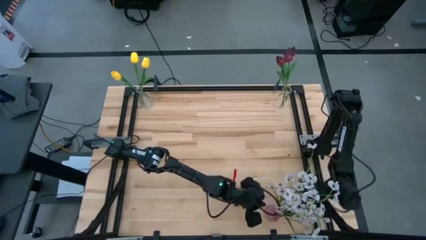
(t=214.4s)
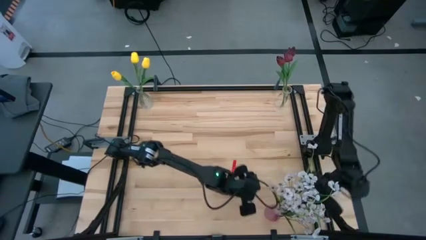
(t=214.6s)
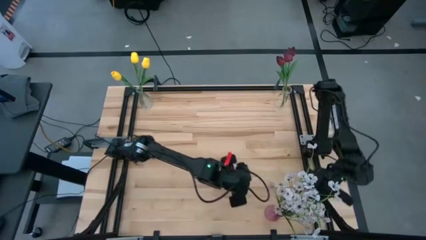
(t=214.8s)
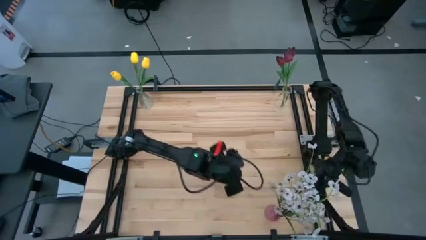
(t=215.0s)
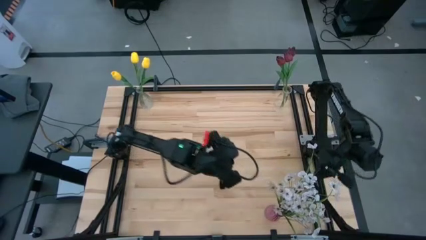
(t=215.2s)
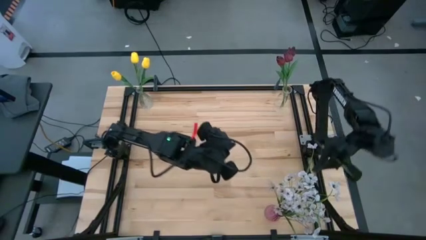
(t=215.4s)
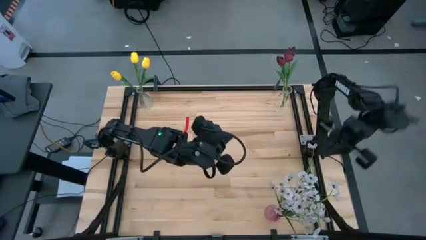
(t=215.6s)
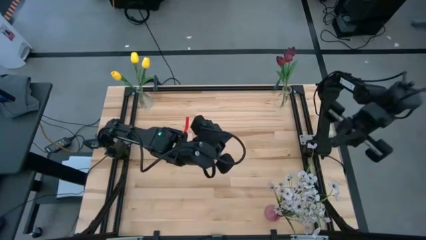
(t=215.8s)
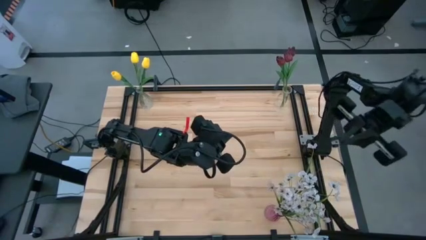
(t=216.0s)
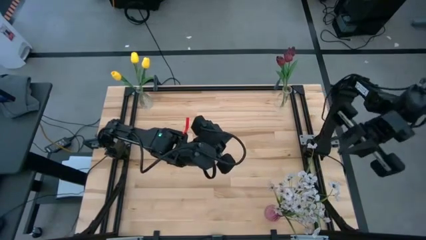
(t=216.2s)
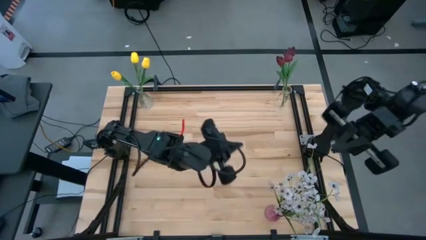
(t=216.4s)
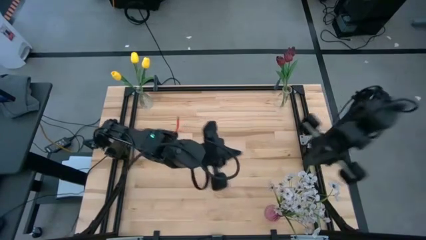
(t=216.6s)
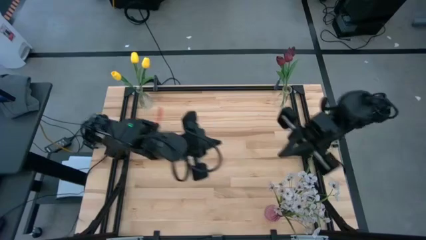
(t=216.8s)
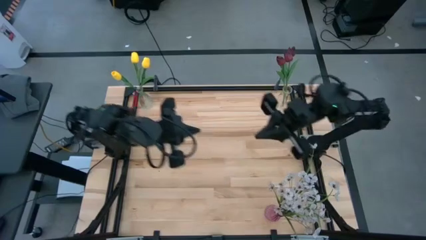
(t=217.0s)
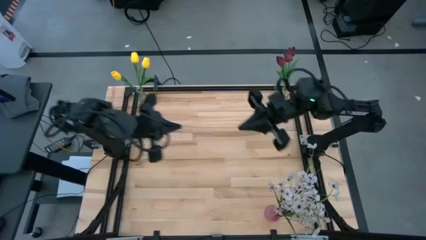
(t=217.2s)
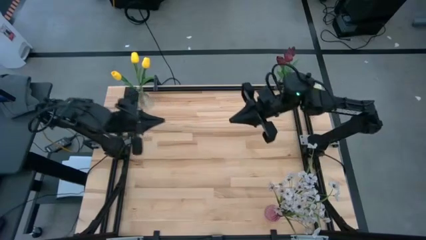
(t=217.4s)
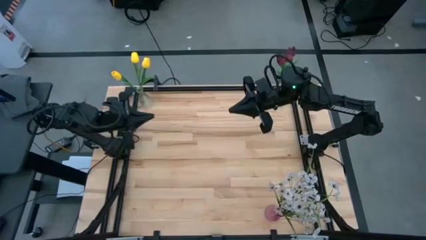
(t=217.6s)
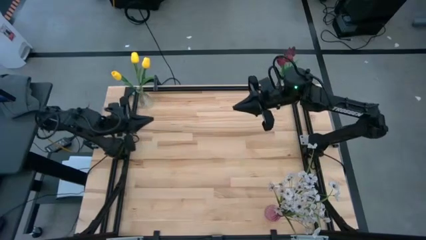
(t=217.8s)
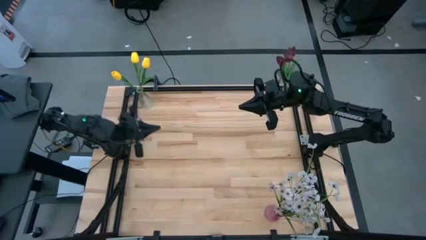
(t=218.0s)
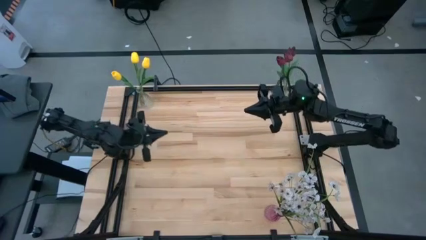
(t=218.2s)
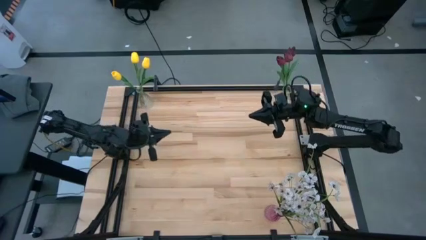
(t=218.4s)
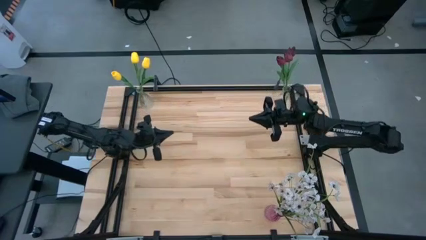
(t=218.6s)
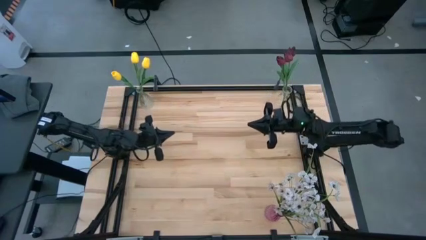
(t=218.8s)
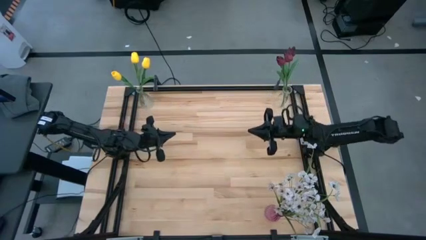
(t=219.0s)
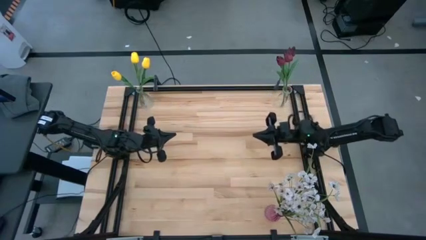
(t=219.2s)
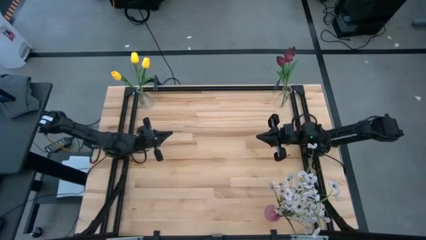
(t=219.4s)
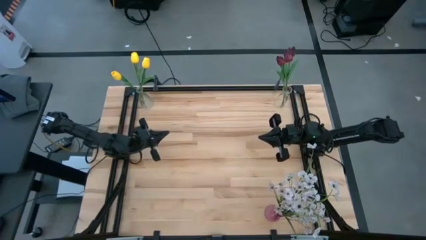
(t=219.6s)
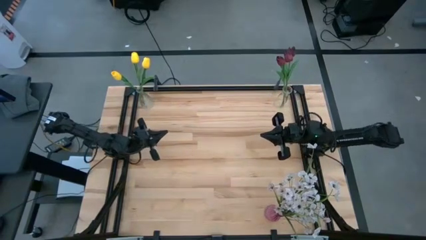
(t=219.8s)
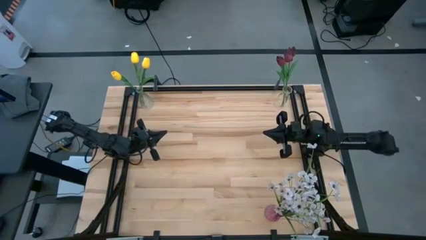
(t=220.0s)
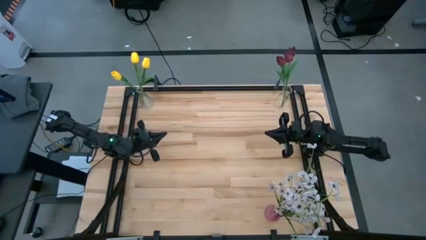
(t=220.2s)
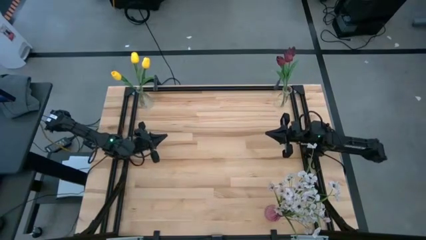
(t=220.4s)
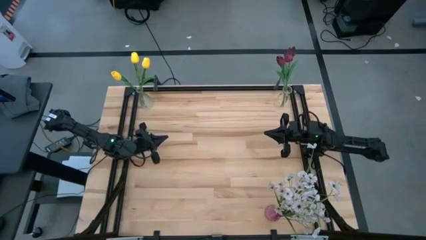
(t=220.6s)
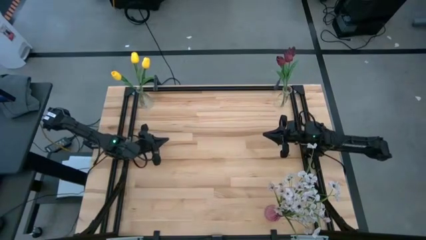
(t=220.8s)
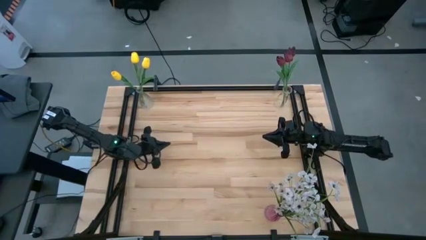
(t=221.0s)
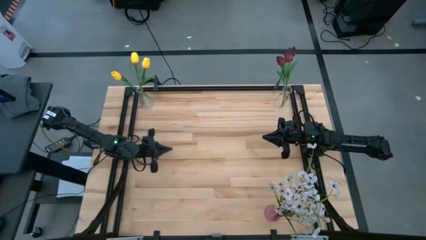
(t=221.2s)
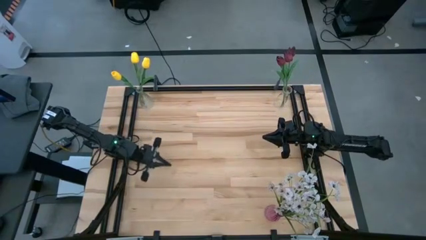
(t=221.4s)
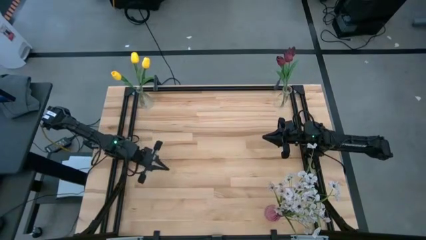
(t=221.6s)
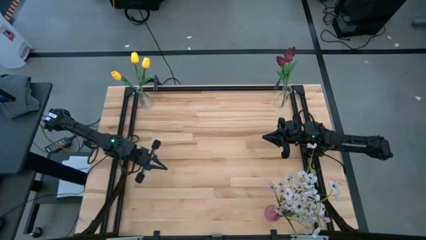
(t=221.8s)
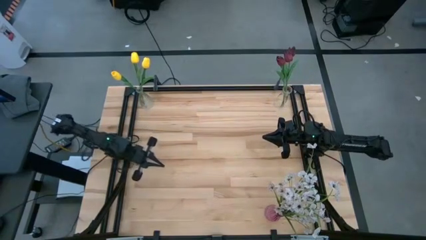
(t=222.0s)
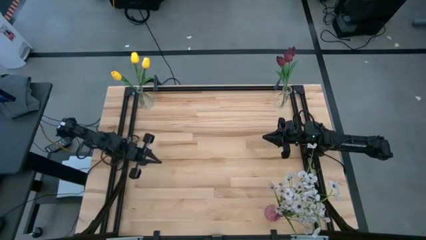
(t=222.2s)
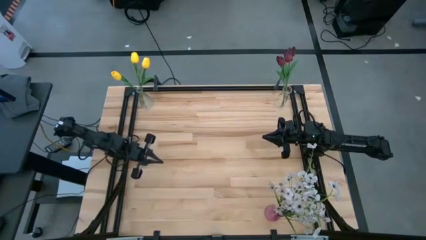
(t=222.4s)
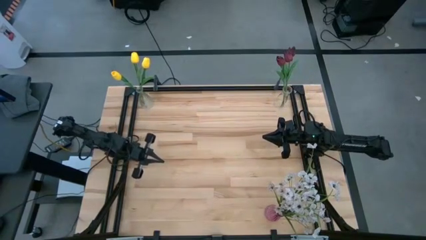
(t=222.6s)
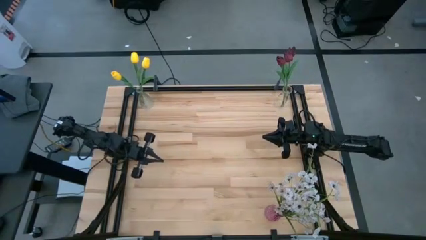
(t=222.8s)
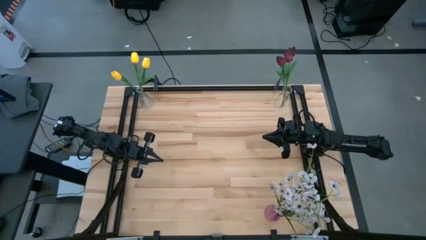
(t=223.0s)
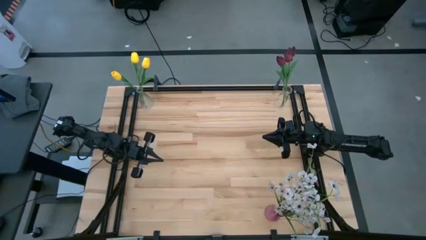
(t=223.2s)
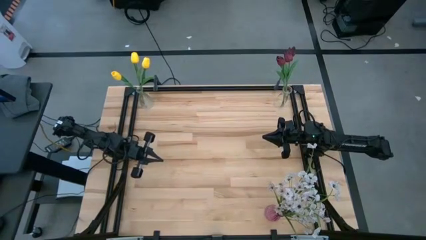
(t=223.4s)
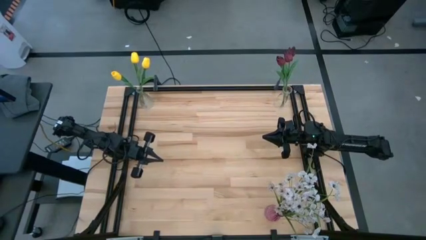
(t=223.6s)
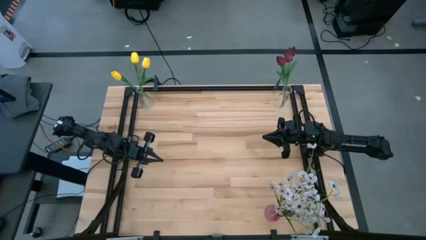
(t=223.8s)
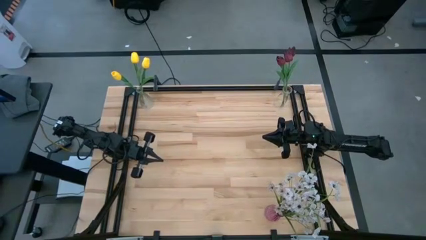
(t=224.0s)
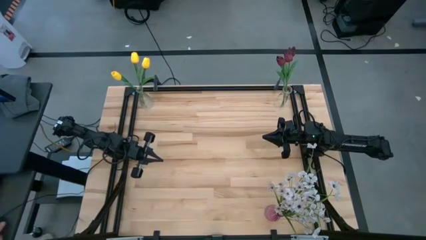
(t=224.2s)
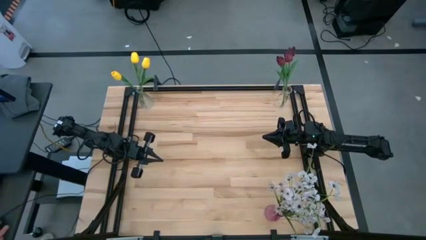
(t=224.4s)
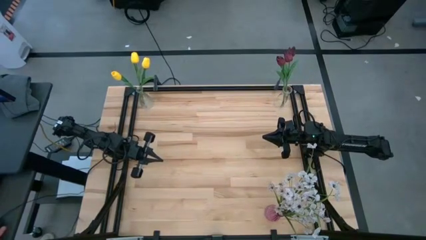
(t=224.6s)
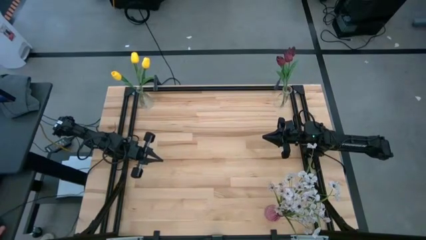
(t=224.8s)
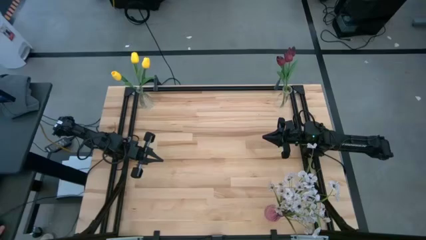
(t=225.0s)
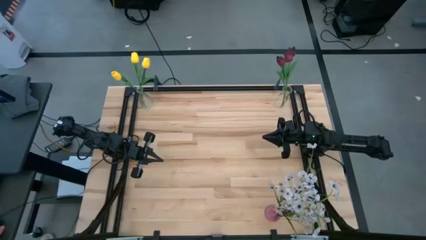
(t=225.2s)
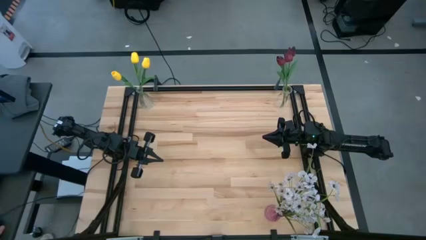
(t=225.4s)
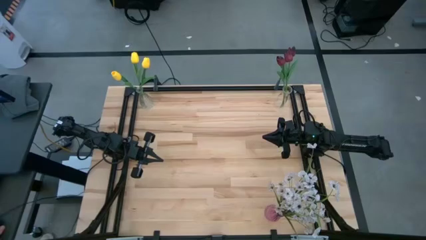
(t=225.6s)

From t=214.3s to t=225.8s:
Task: Sort flowers into vase by color
Return to Home Position
